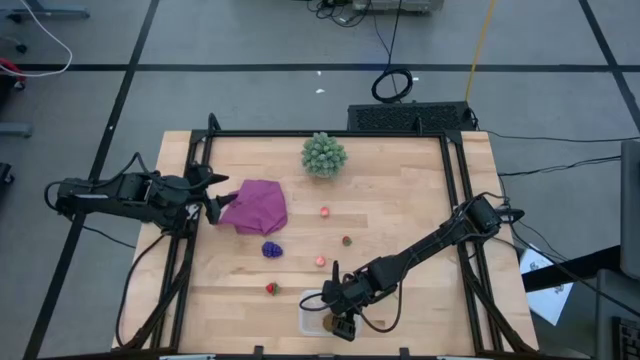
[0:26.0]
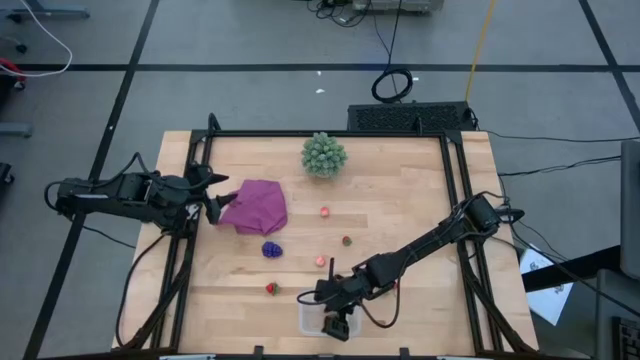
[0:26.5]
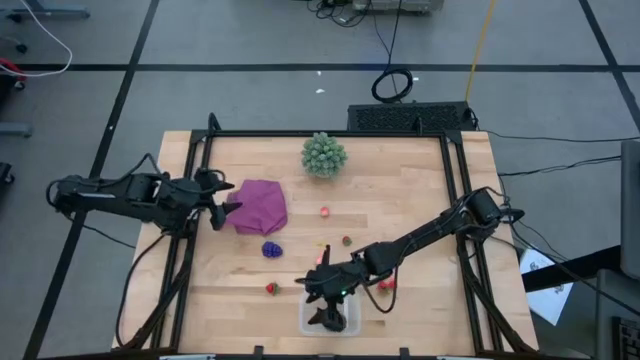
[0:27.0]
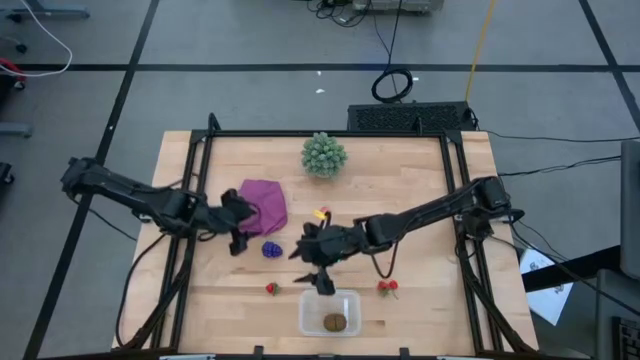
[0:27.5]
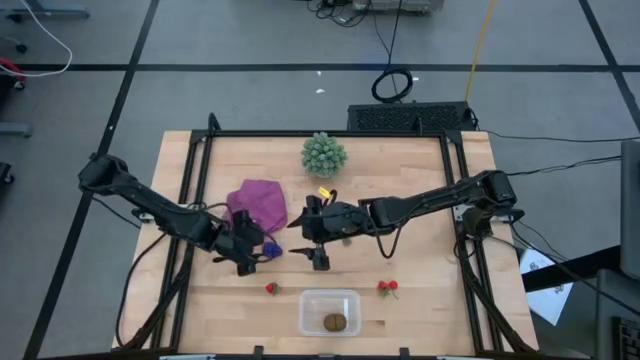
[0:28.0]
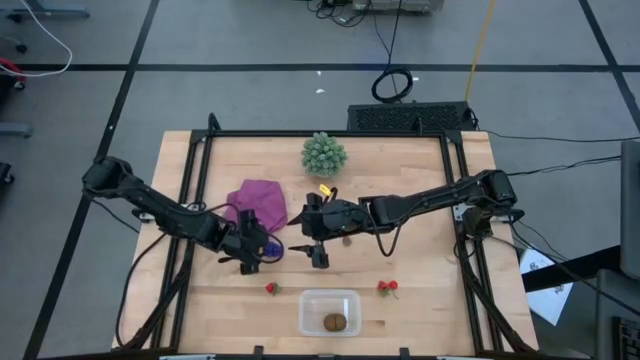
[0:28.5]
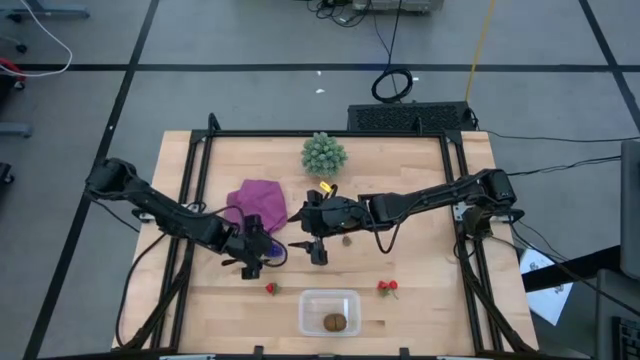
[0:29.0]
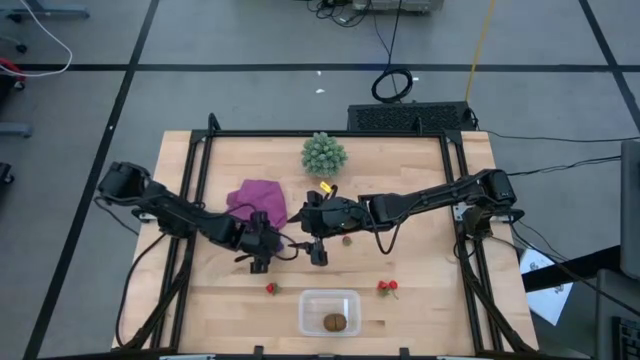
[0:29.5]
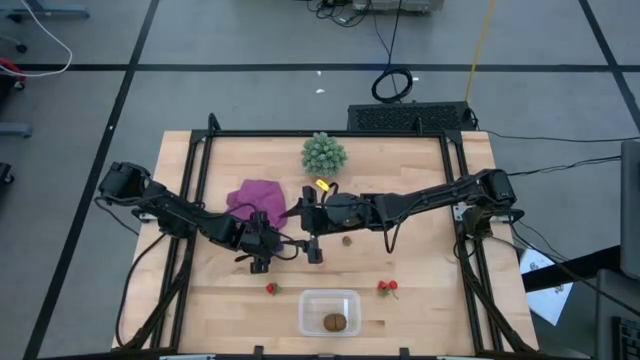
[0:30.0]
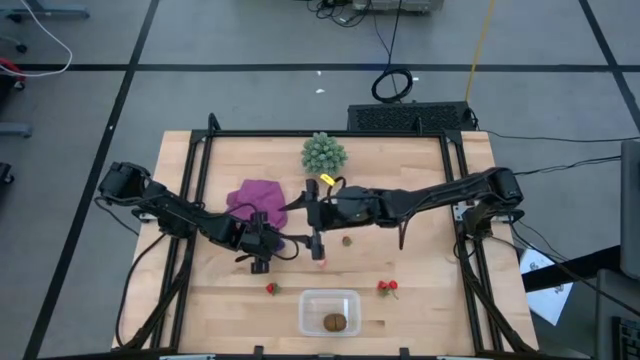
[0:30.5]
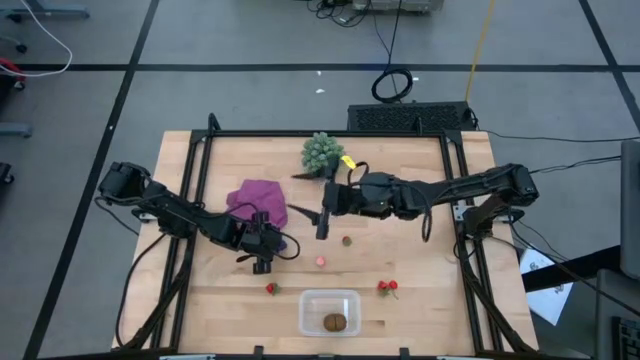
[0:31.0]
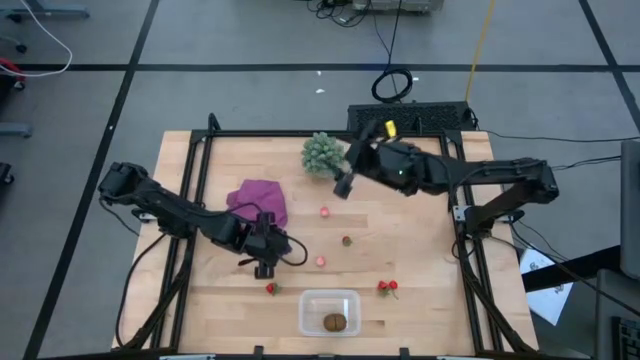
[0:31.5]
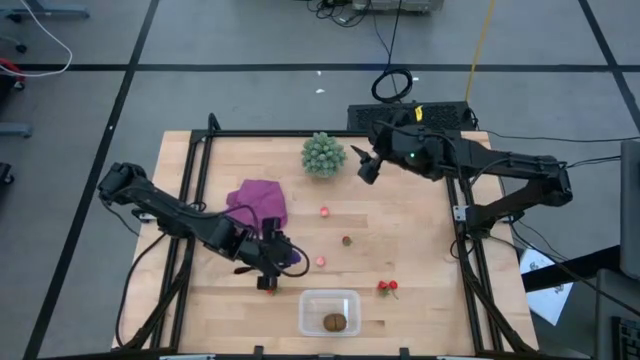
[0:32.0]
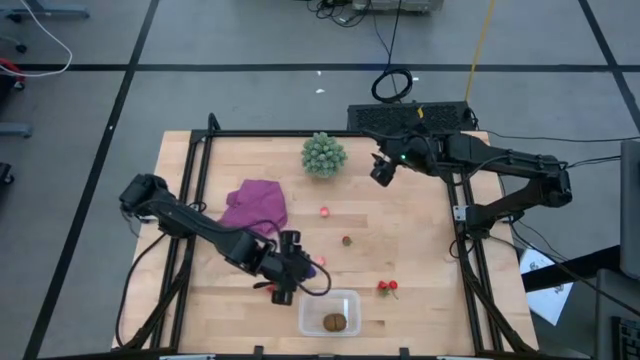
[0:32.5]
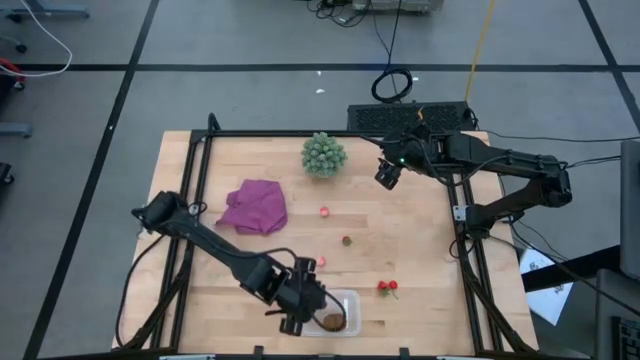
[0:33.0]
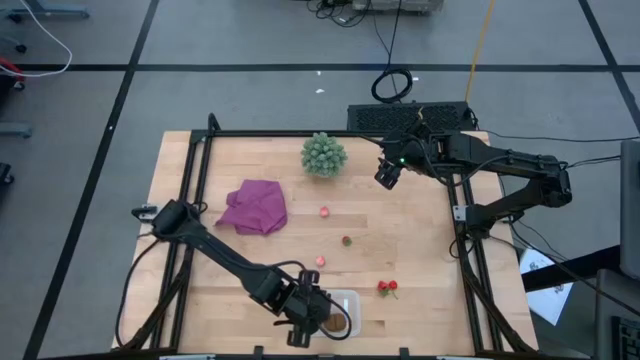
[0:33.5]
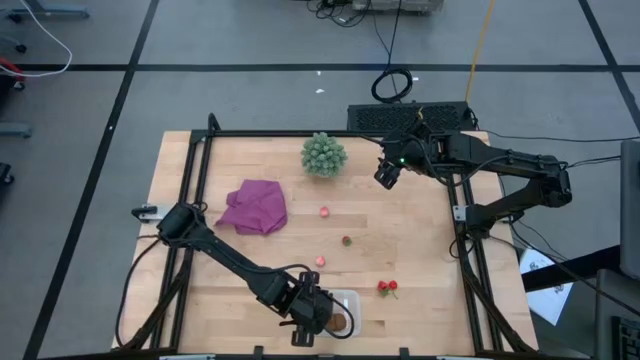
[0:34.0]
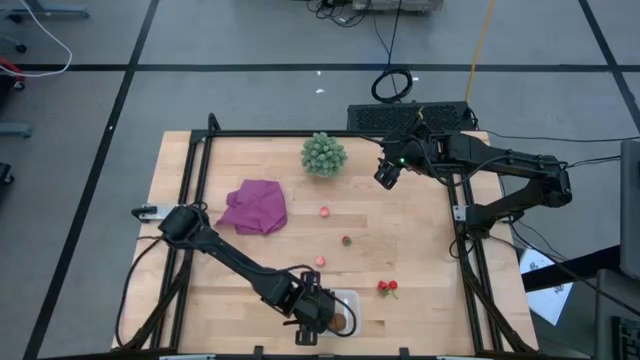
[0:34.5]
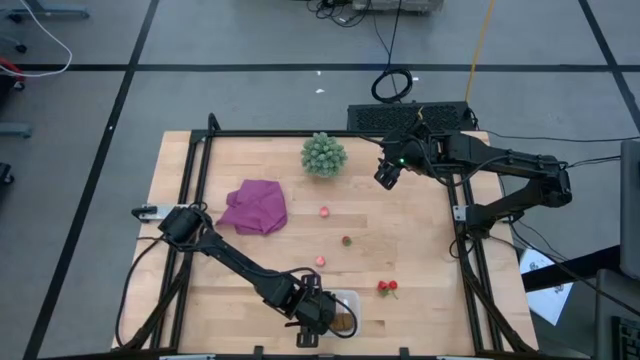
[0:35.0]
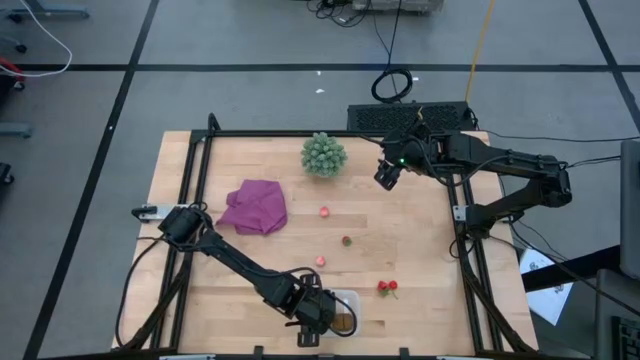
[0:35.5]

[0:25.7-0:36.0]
Task: Pick and placing Produce into tupperware
Put the violet grapes into the transparent container

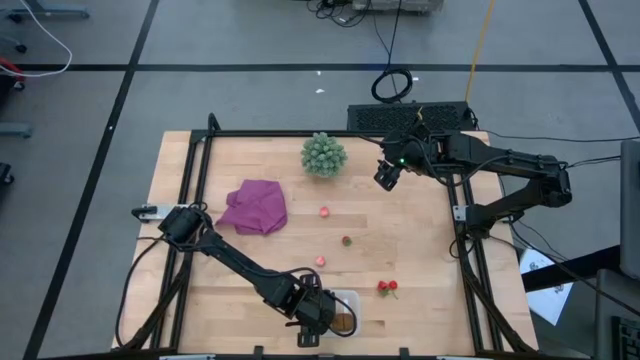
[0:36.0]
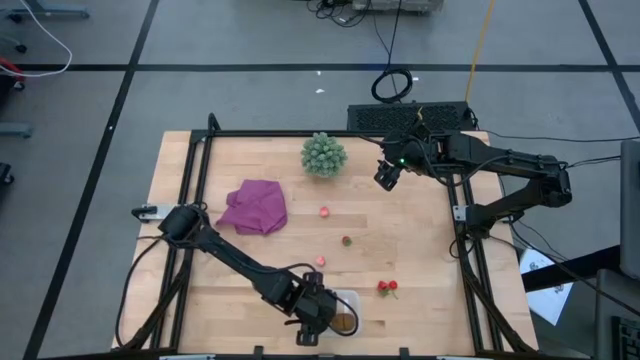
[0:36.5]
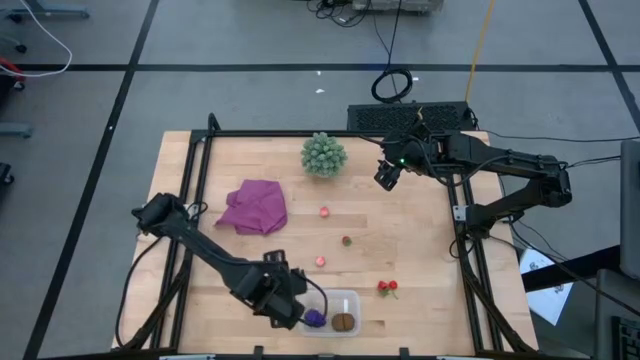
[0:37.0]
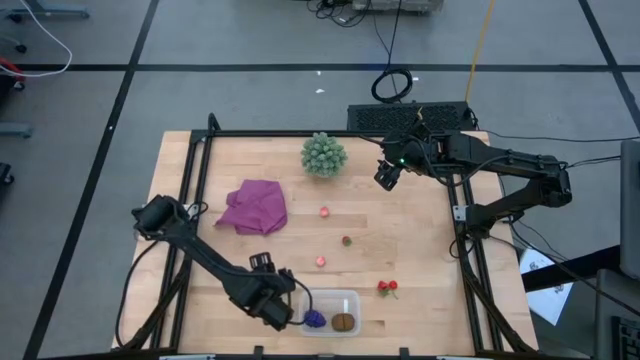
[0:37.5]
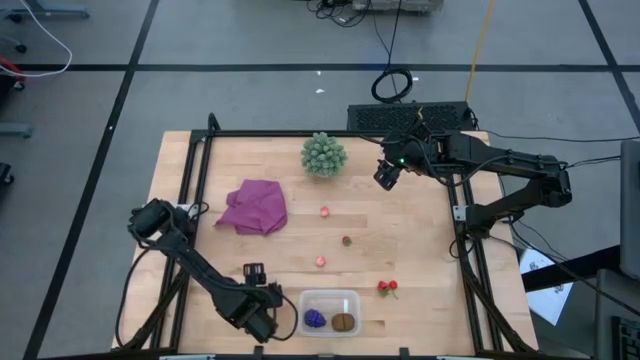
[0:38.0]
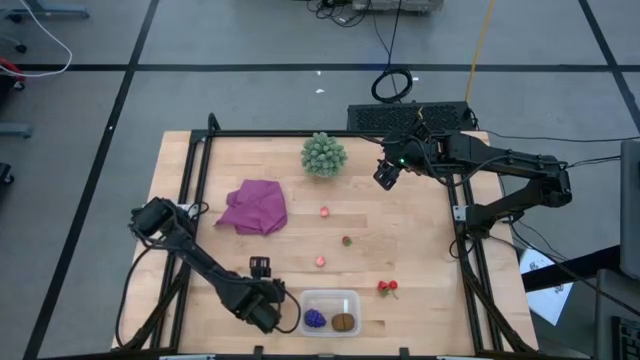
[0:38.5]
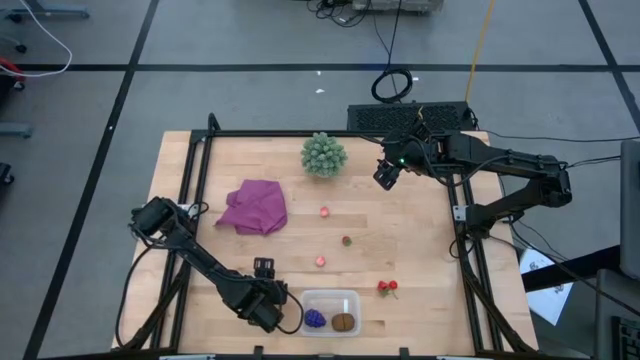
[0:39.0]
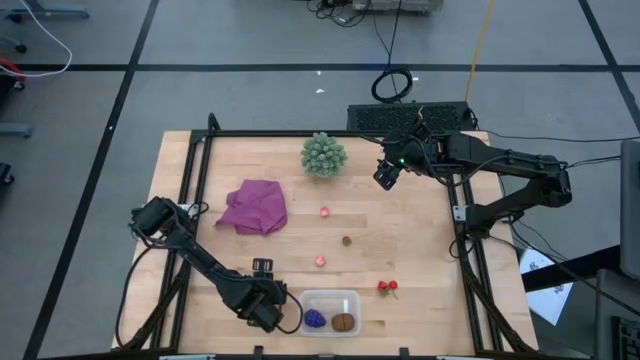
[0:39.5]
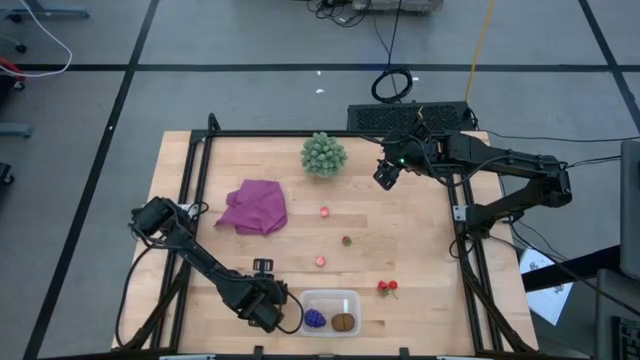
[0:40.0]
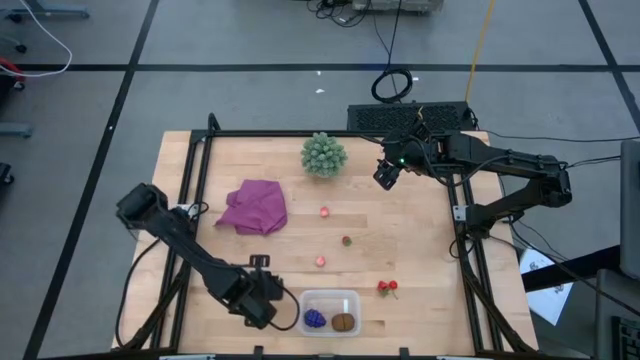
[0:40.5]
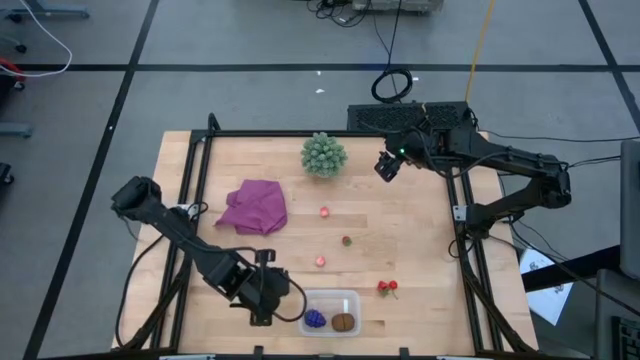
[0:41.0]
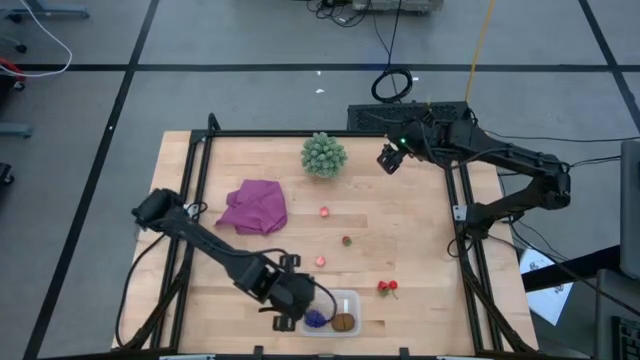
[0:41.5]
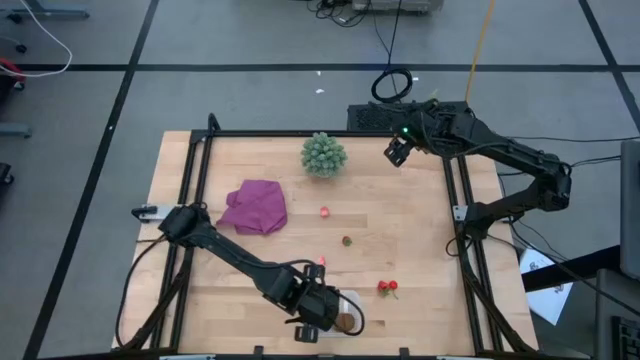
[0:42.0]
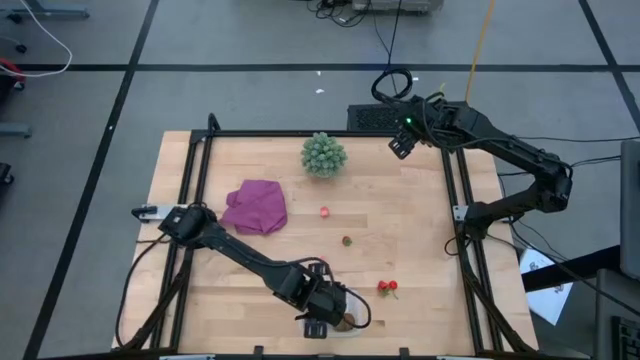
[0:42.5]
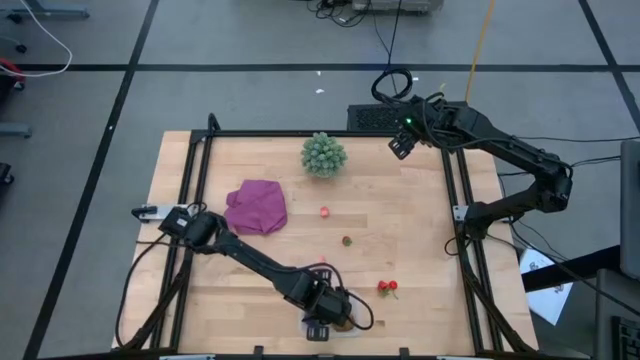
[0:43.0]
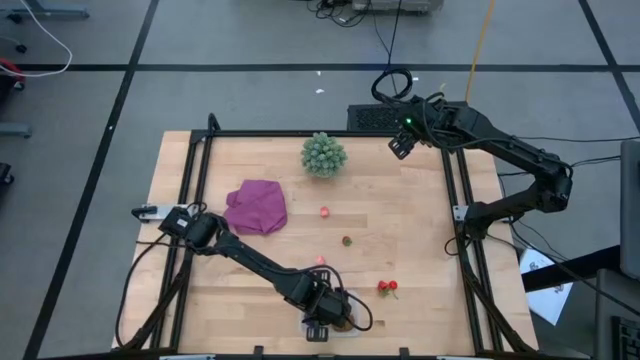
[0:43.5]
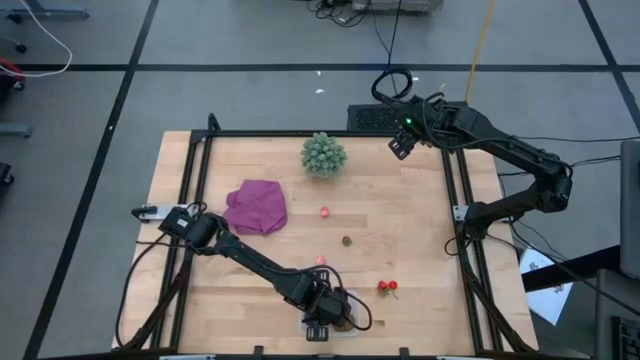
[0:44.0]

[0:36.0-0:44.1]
Put the bottom left red strawberry into the transparent container

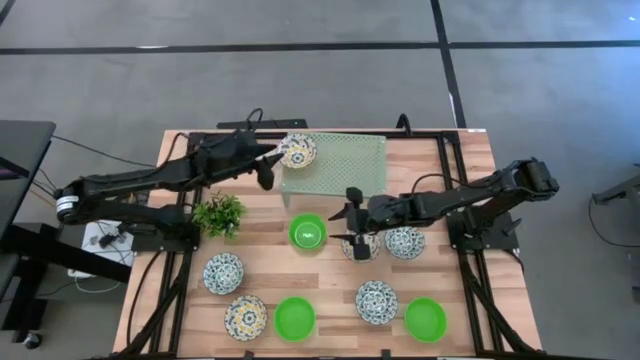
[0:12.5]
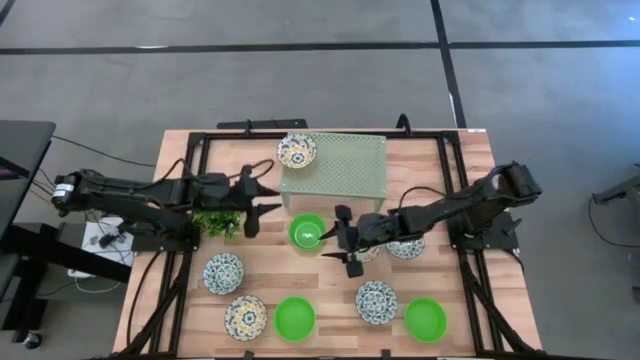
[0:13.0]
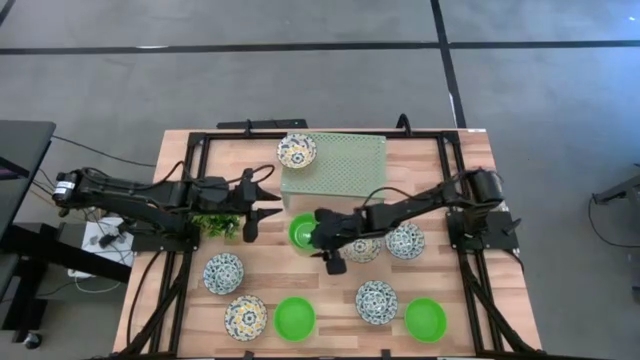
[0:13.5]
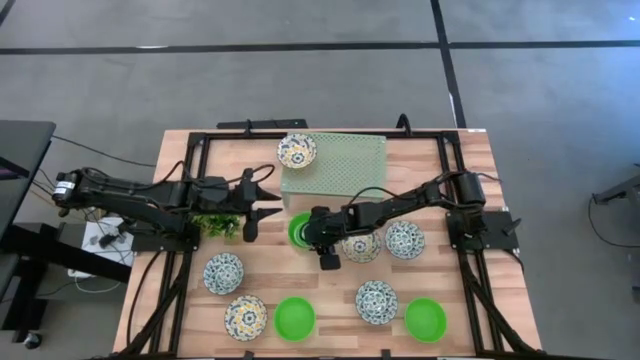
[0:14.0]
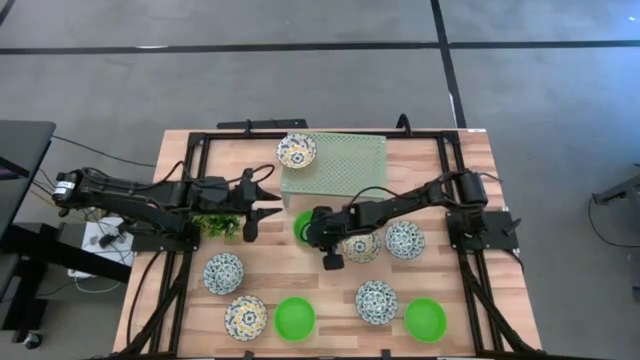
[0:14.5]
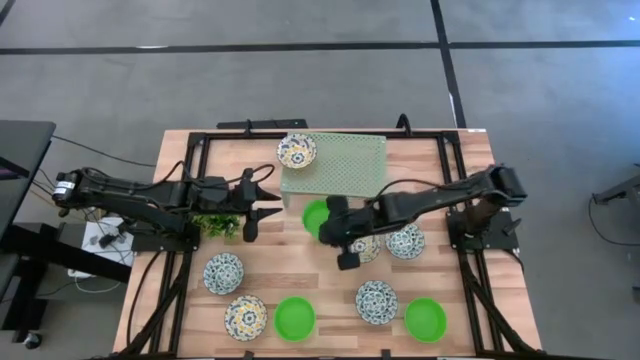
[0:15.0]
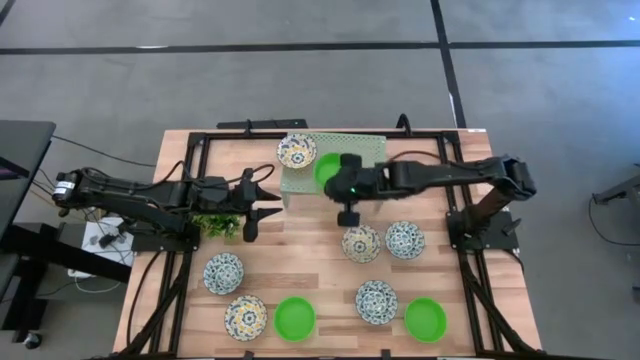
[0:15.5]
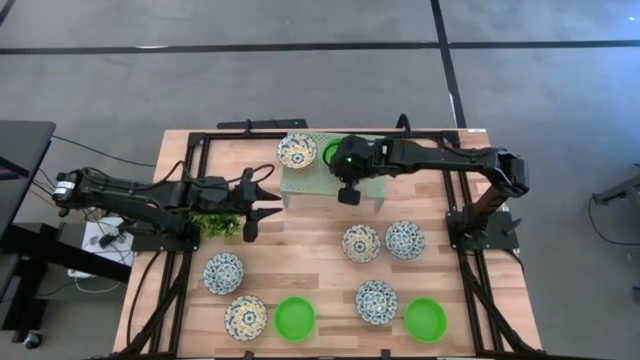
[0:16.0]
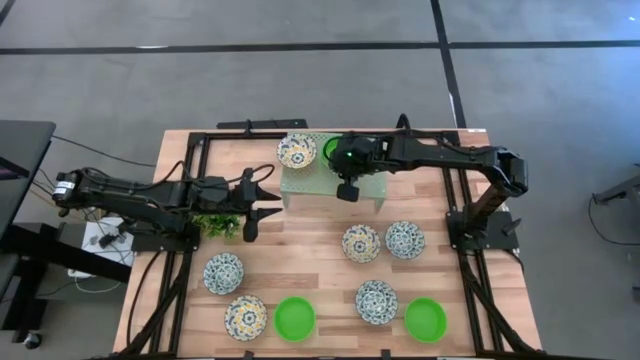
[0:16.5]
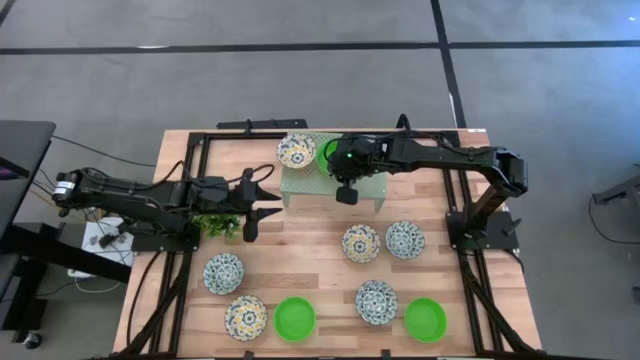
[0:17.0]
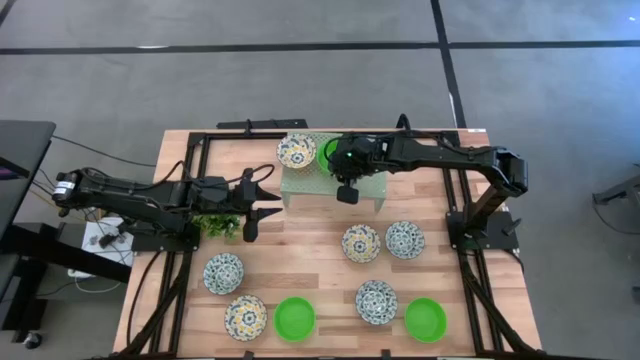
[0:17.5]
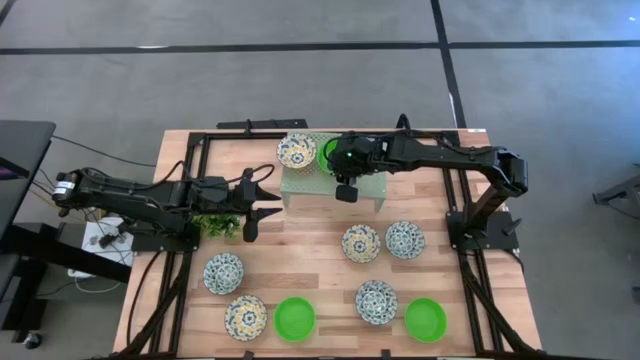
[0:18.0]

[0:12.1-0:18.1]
Task: Pick & Place Mini bowls
Put the top green bowl on the shelf
